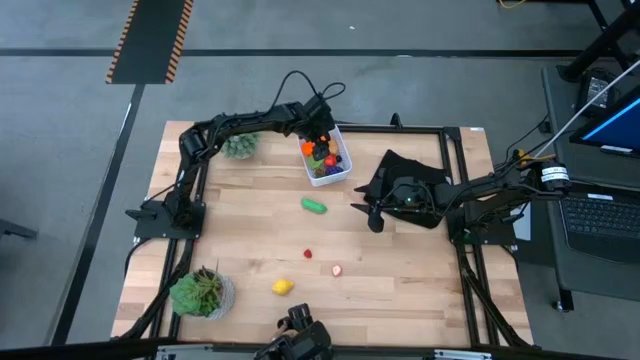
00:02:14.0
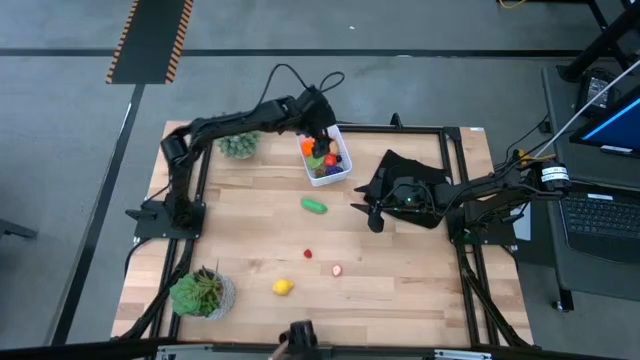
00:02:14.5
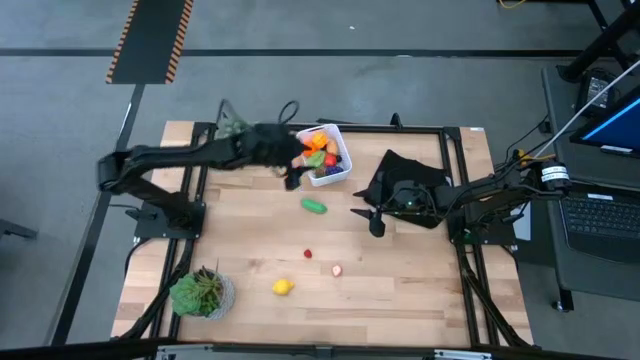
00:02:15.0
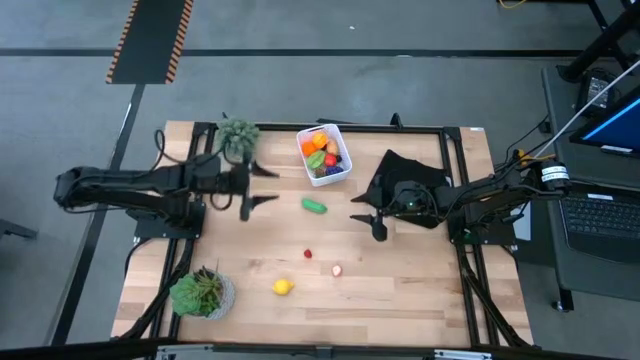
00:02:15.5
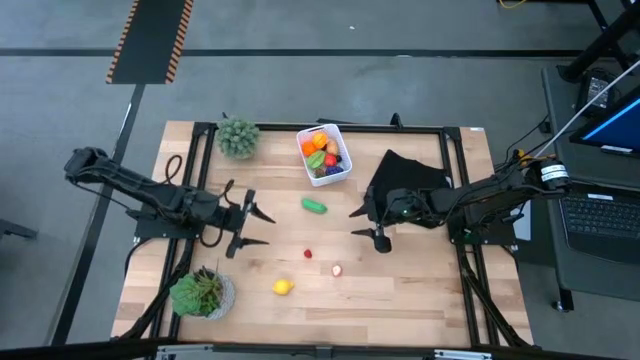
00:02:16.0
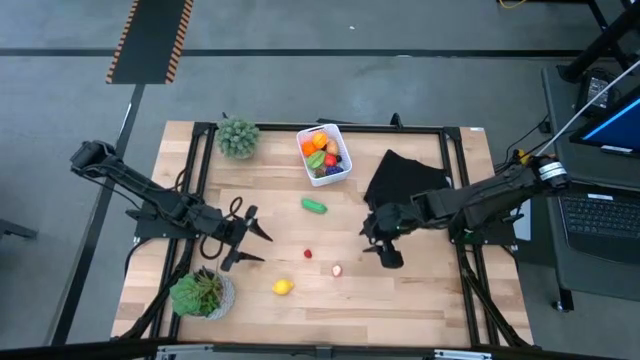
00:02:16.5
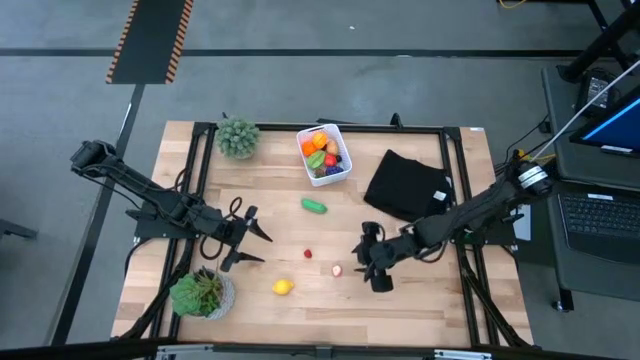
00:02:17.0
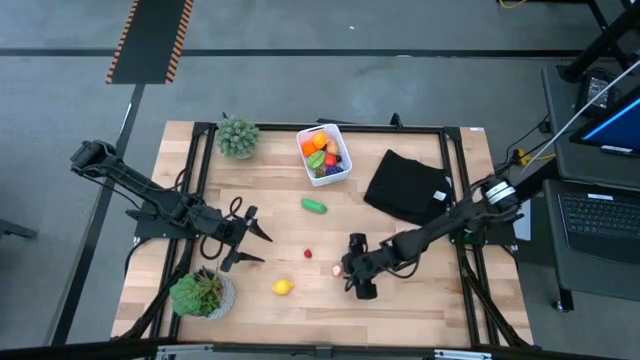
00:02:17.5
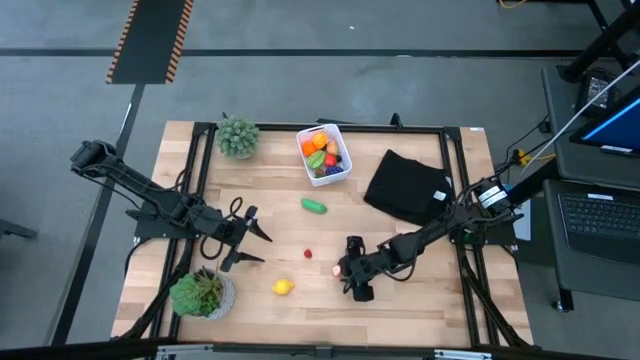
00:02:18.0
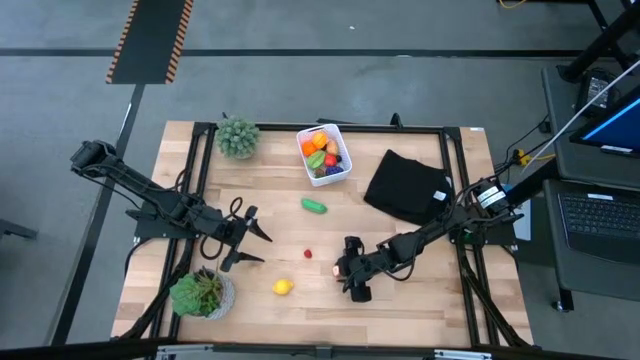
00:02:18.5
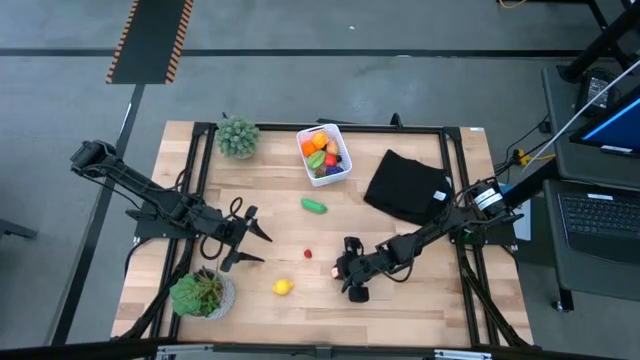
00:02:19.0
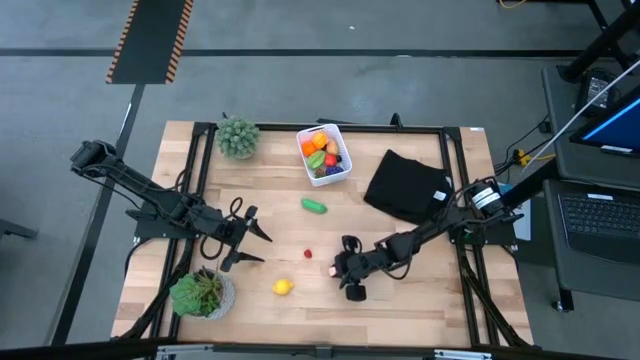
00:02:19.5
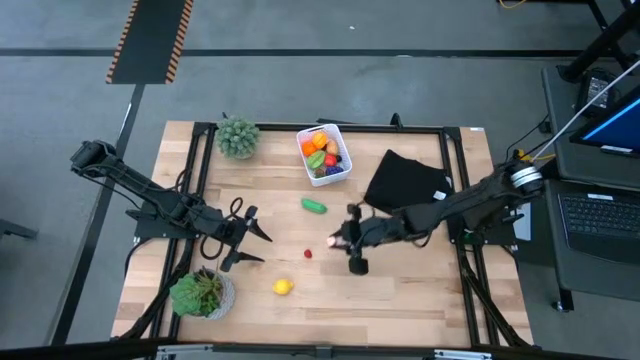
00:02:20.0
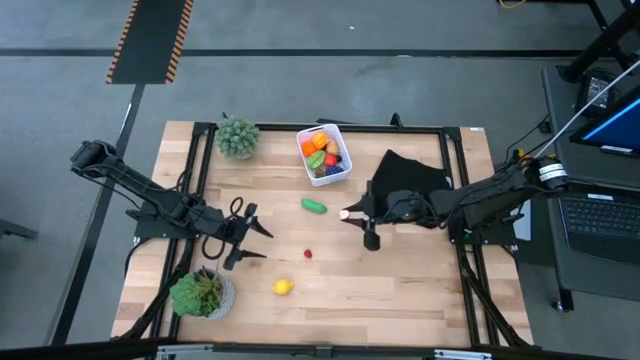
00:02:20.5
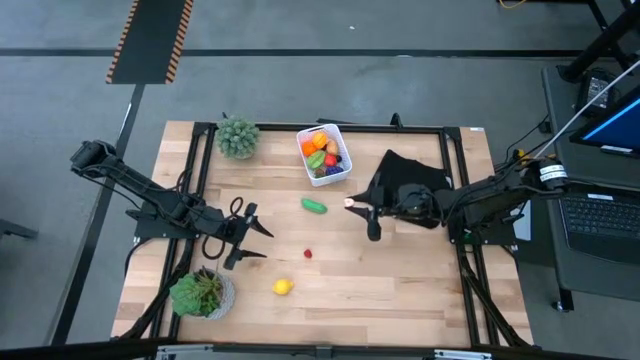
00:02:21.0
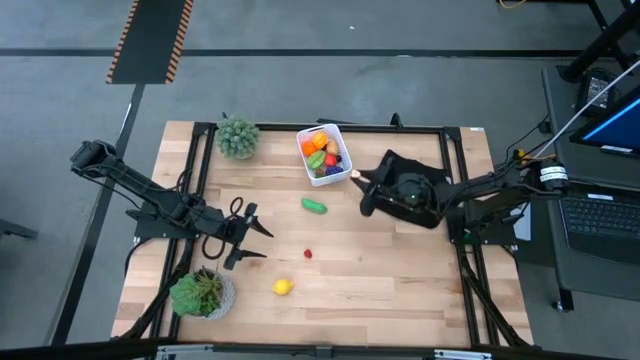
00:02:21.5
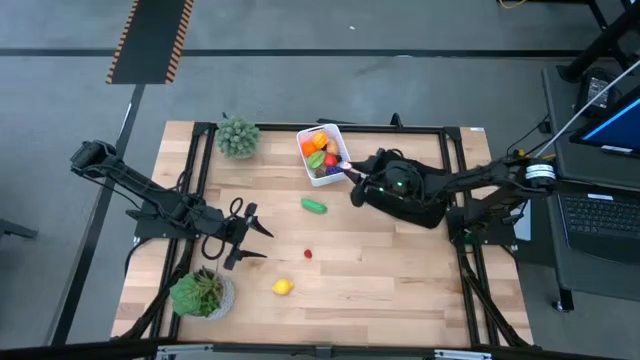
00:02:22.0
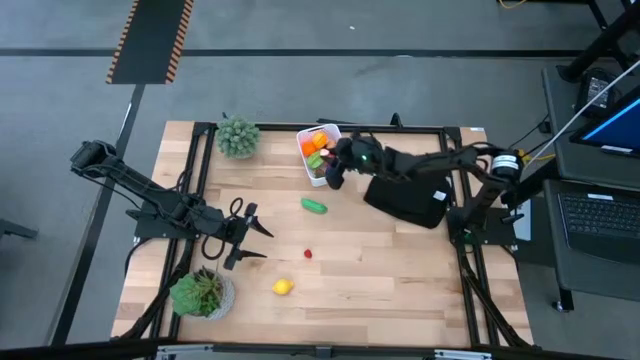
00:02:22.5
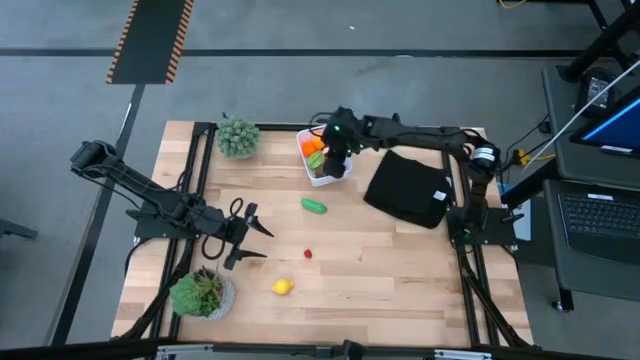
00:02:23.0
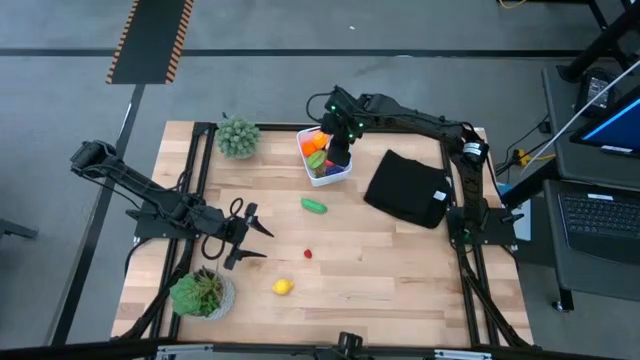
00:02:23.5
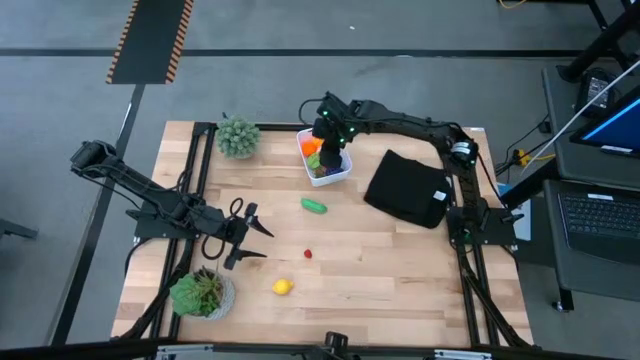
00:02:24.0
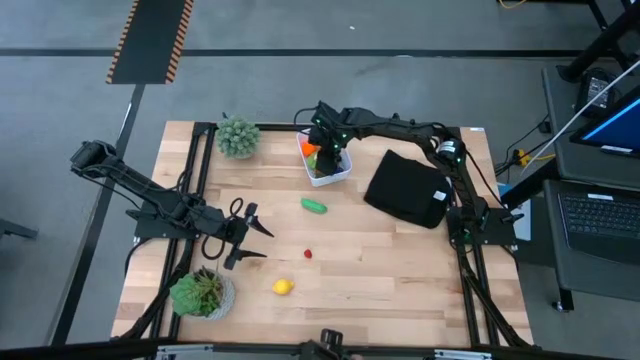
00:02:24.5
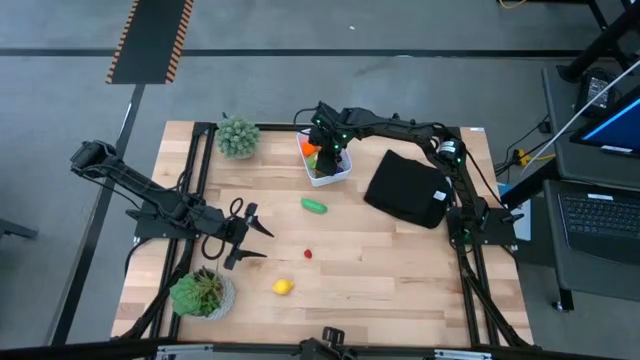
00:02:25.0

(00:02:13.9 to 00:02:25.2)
Task: Pick and placing Produce into tupperware
Put the peach into the basket

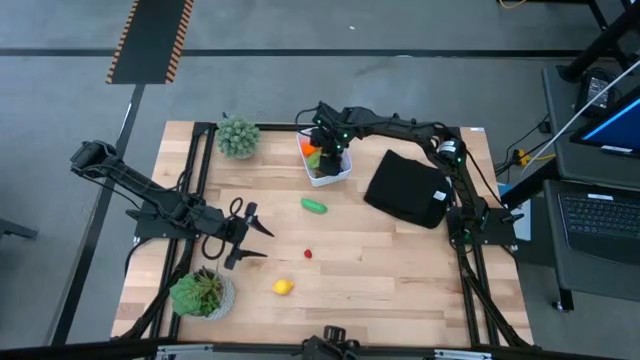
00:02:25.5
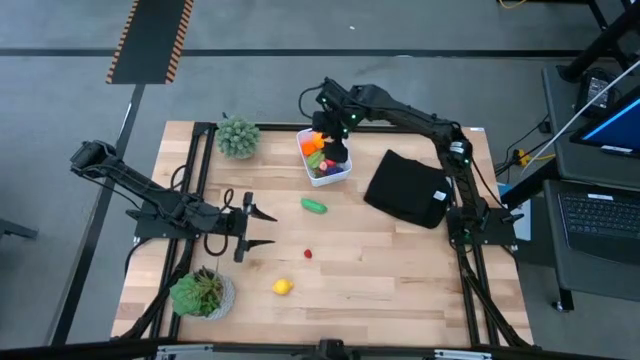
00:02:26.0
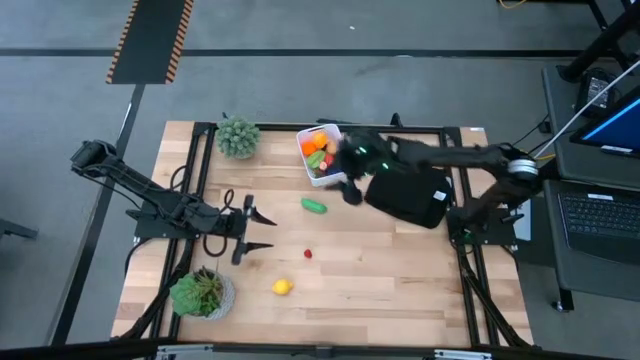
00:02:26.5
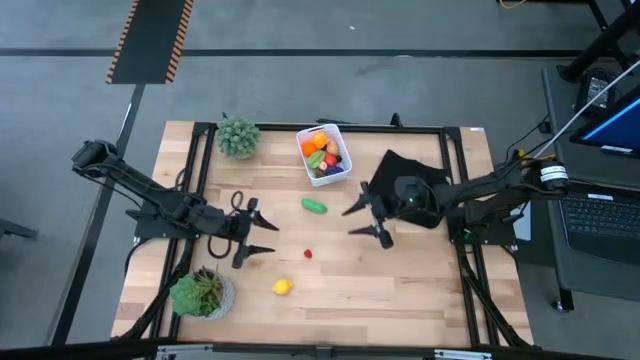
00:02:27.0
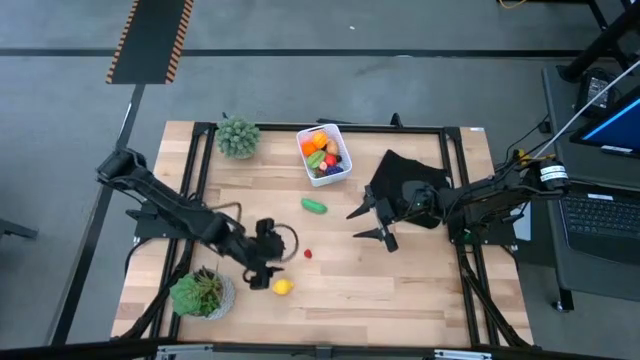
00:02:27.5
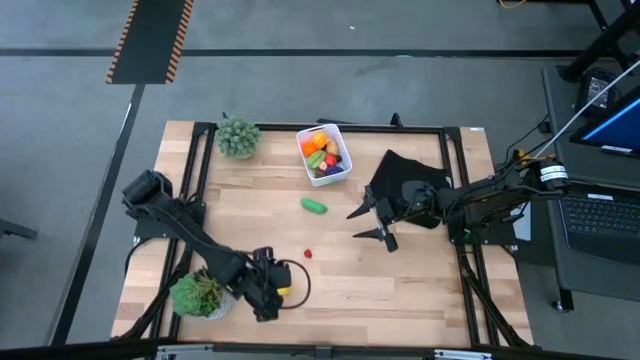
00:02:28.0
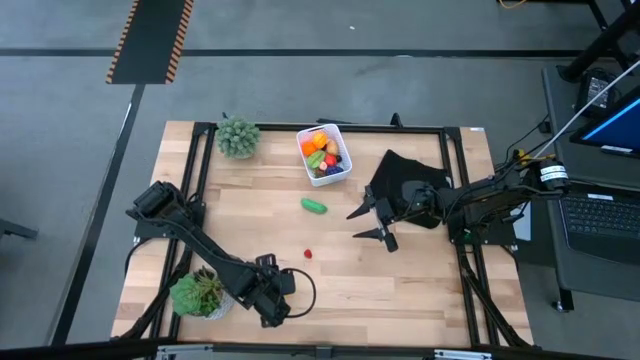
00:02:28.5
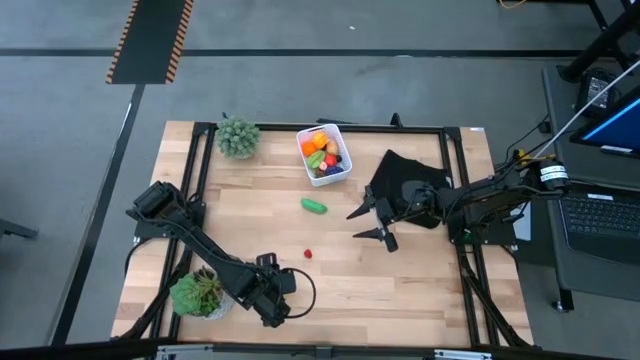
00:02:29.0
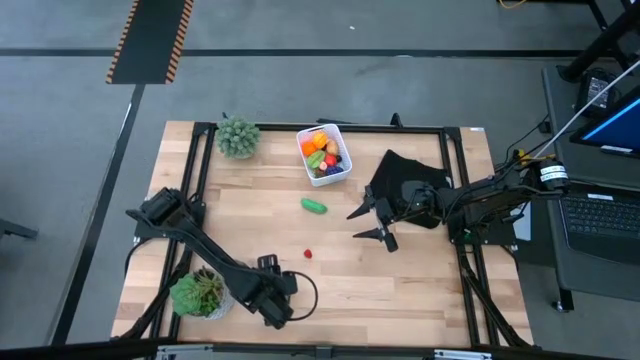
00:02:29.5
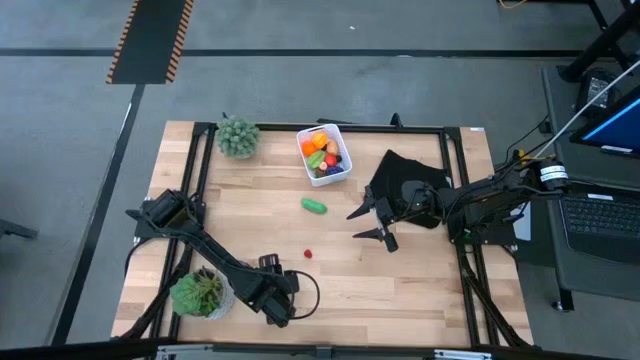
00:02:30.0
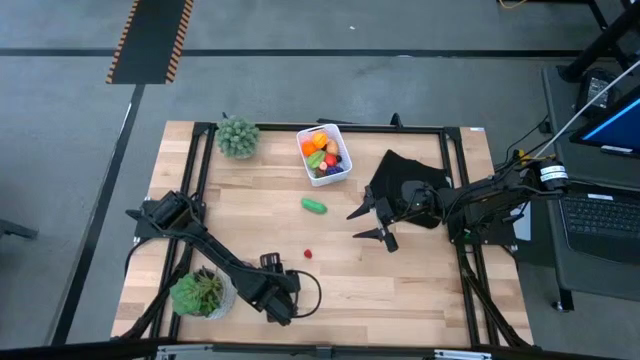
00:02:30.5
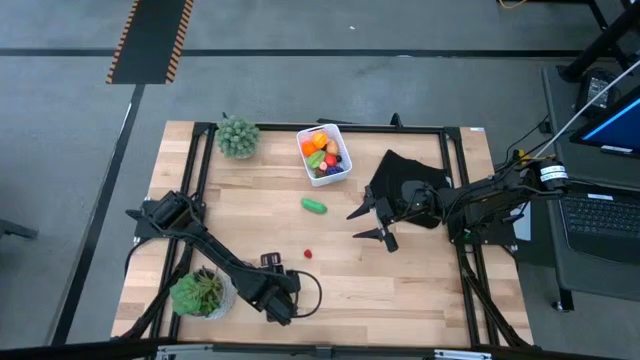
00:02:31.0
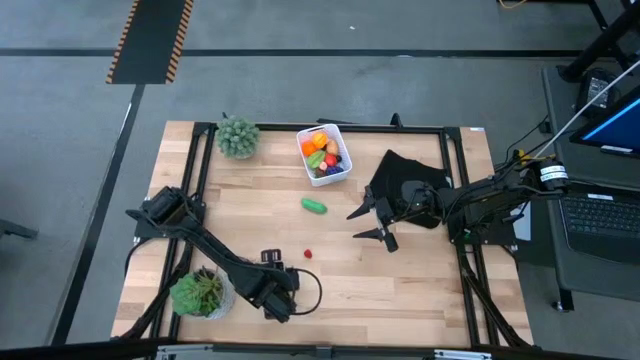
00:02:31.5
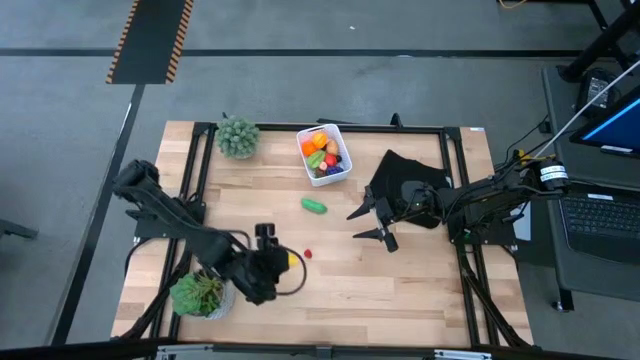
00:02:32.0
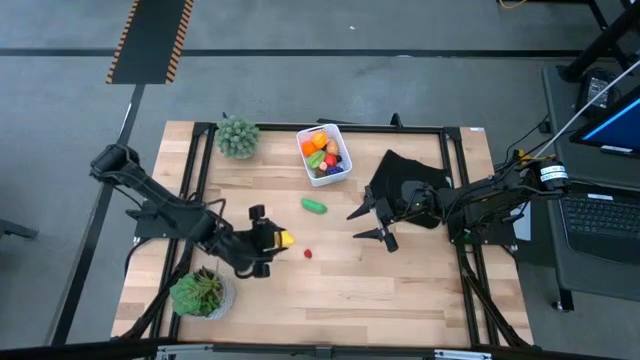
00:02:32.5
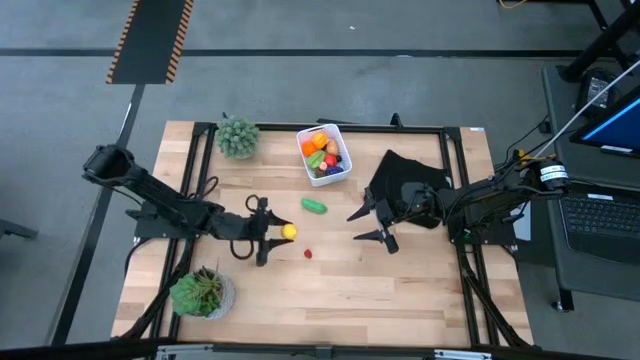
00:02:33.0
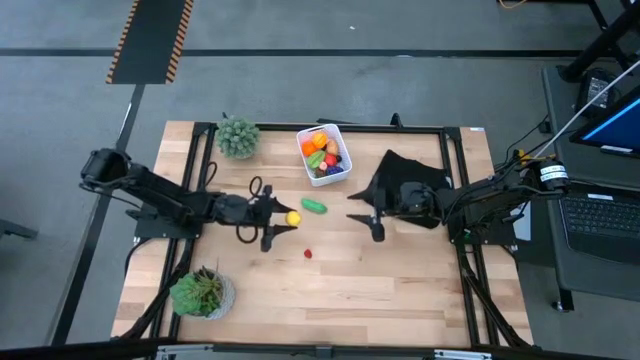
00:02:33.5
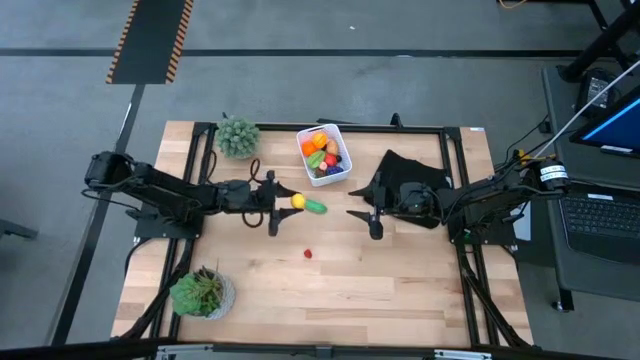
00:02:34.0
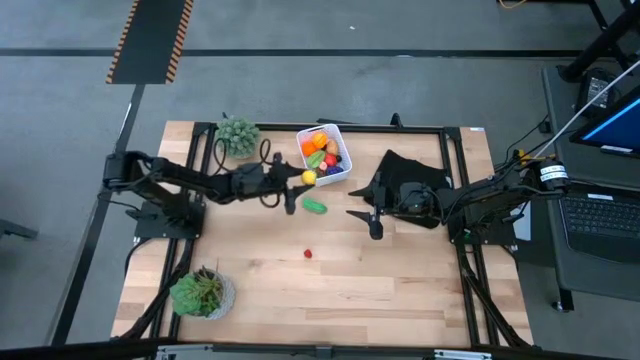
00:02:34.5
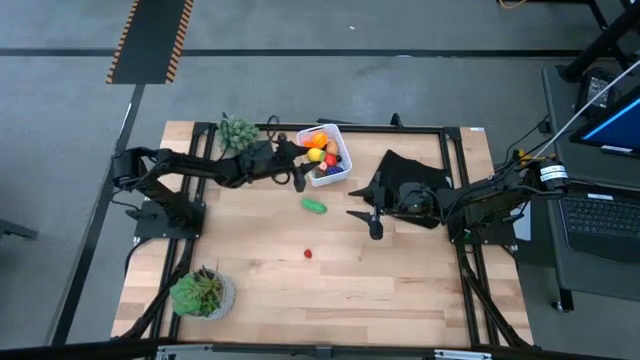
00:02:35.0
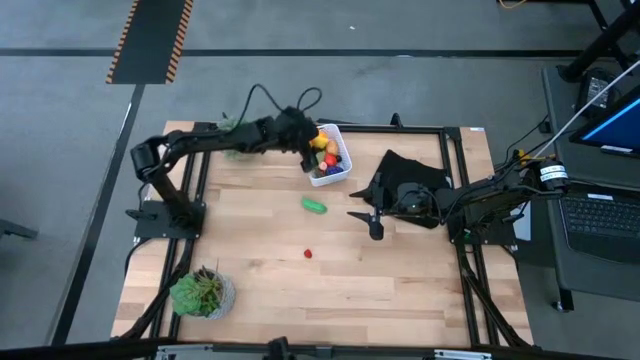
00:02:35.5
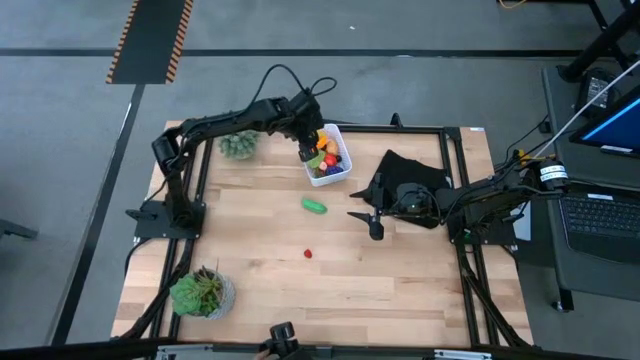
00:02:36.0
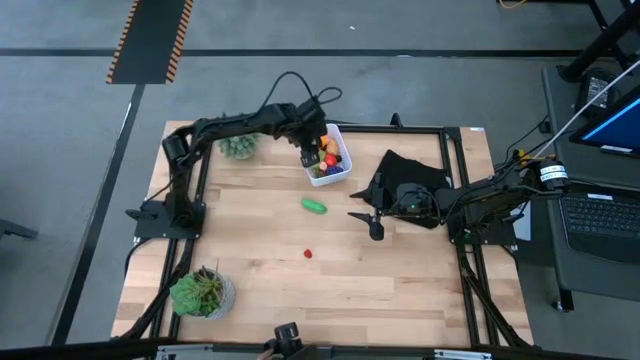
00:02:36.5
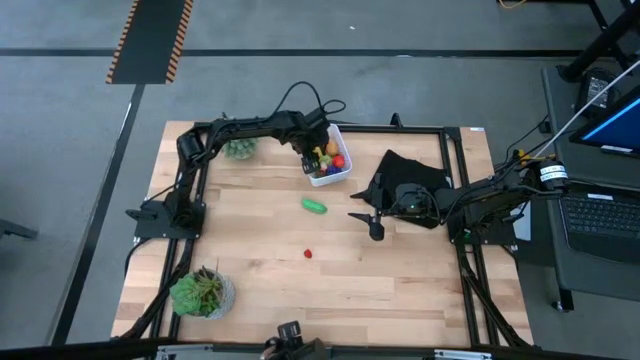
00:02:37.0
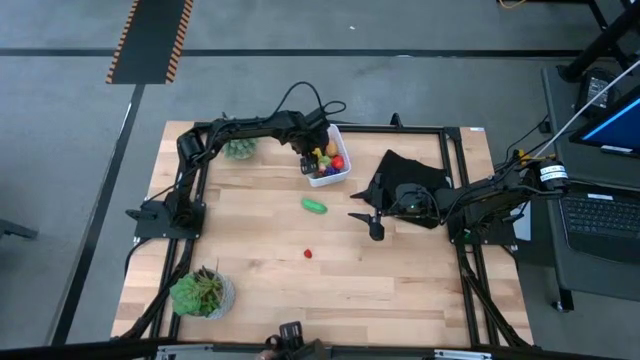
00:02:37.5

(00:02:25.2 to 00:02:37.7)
Put the lemon into the basket
